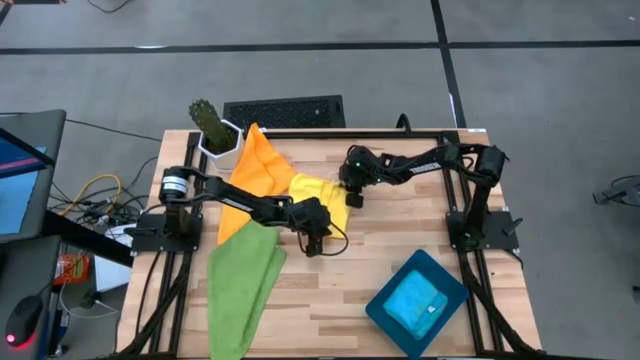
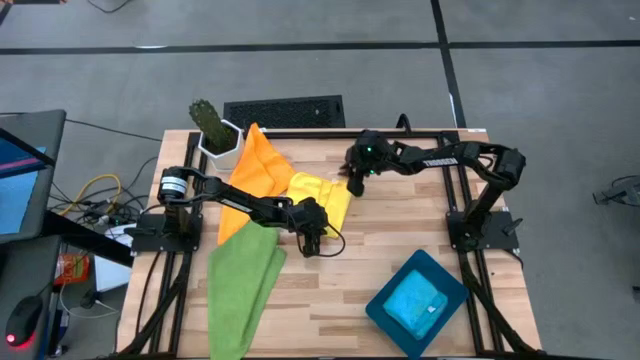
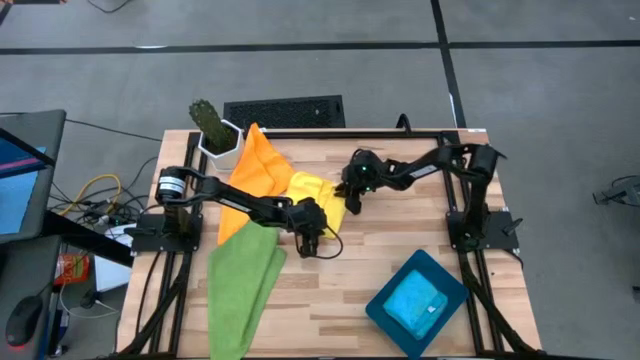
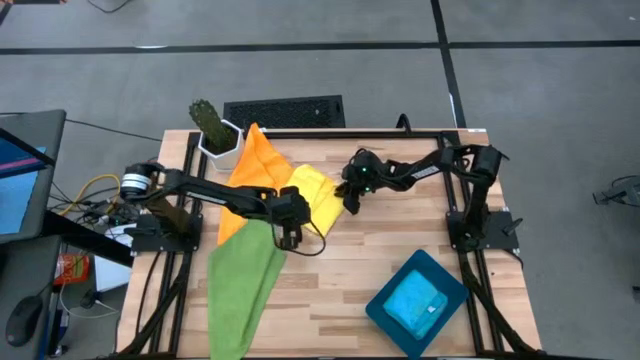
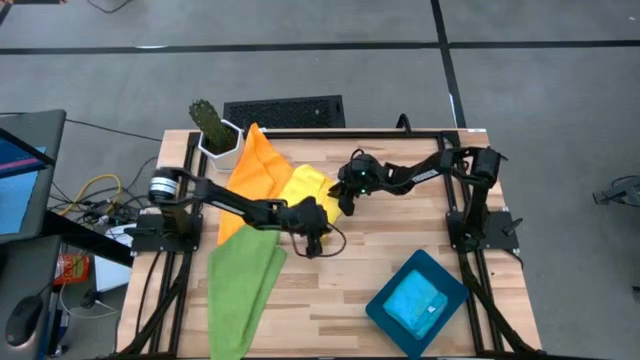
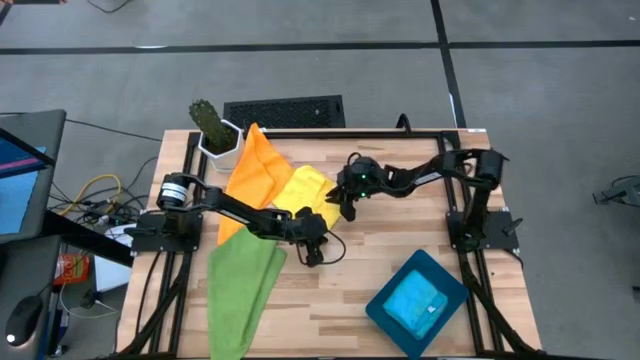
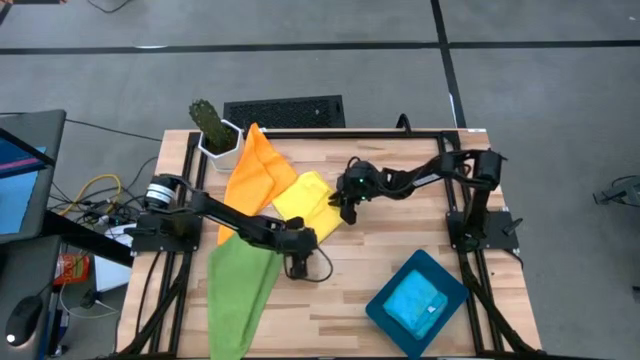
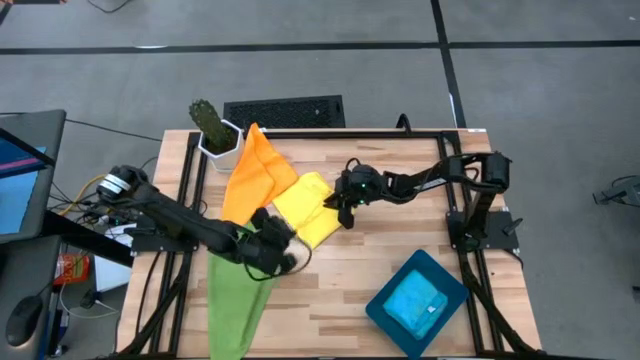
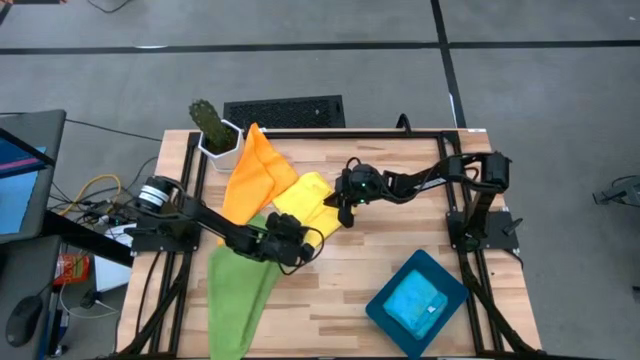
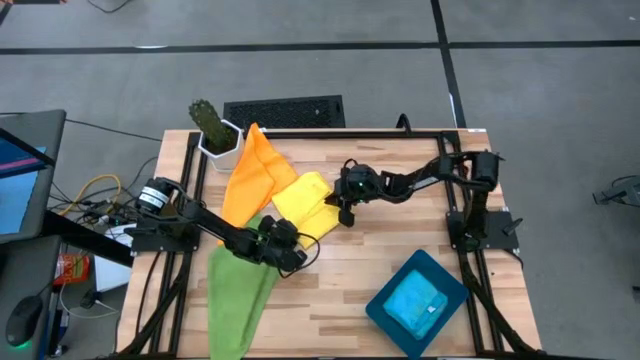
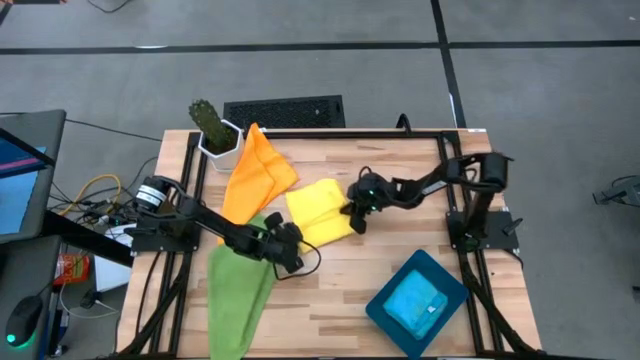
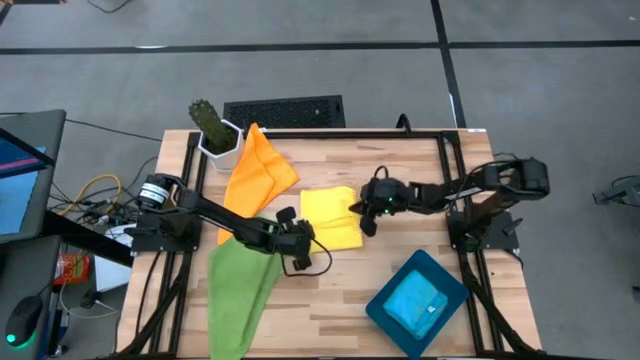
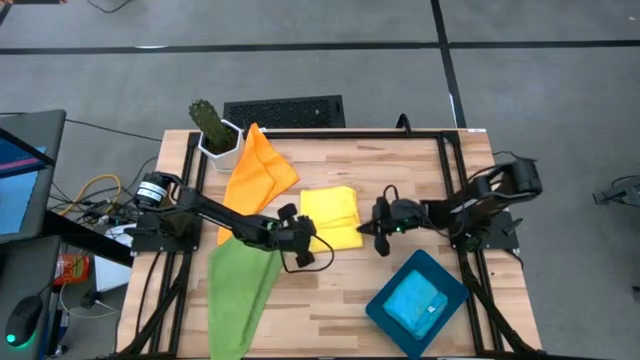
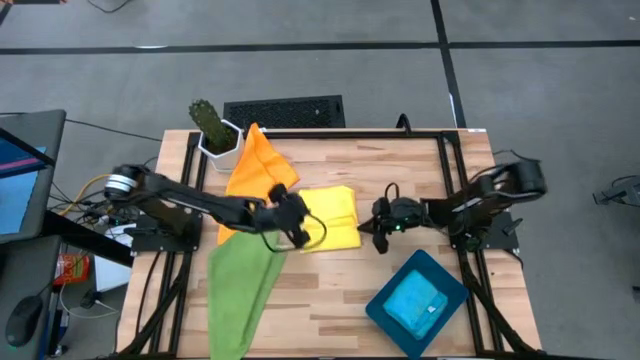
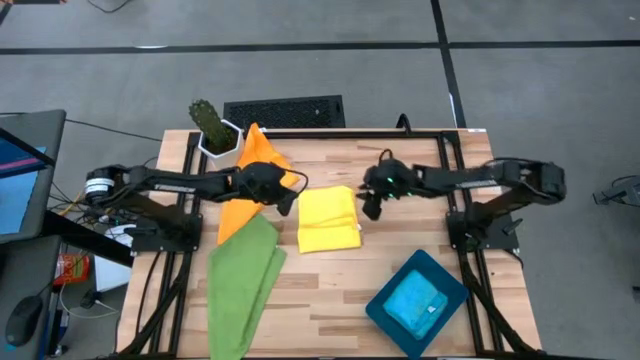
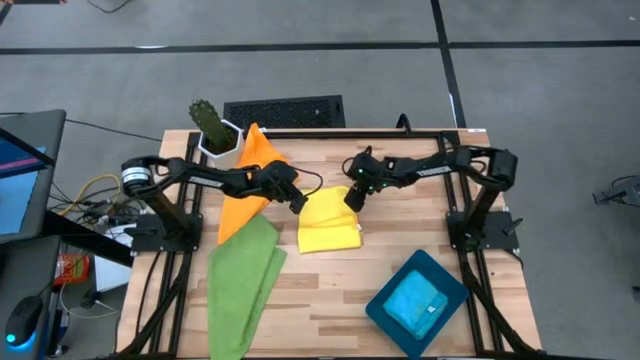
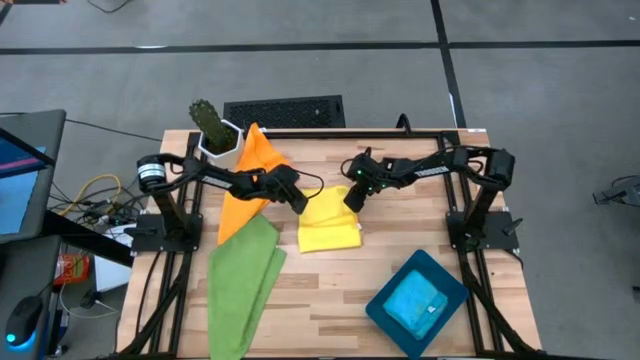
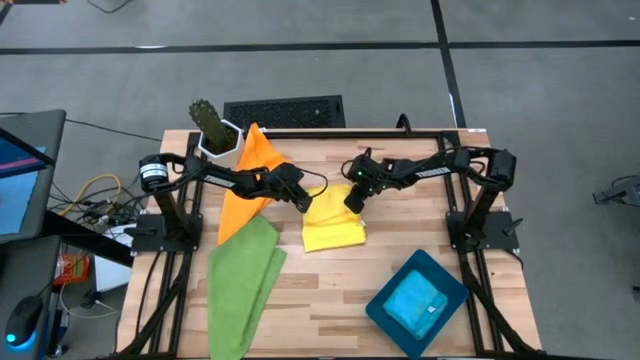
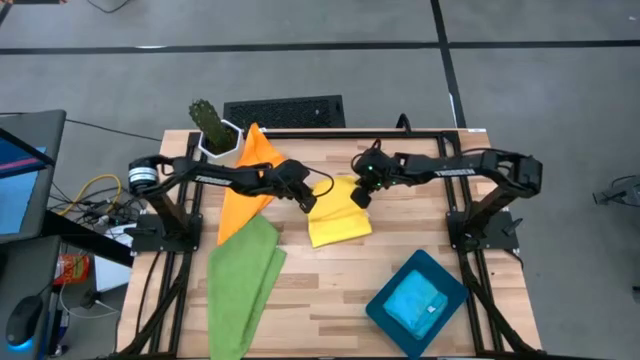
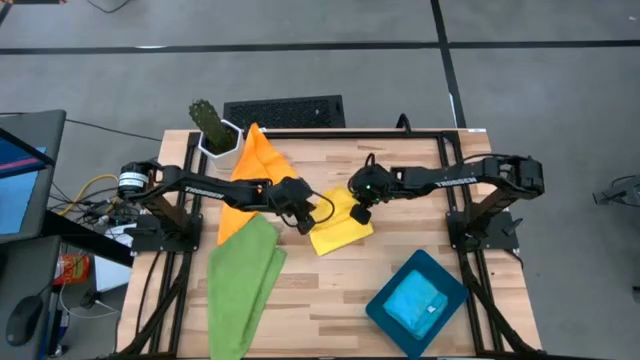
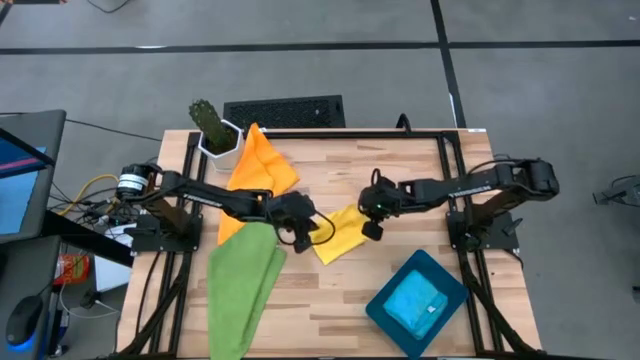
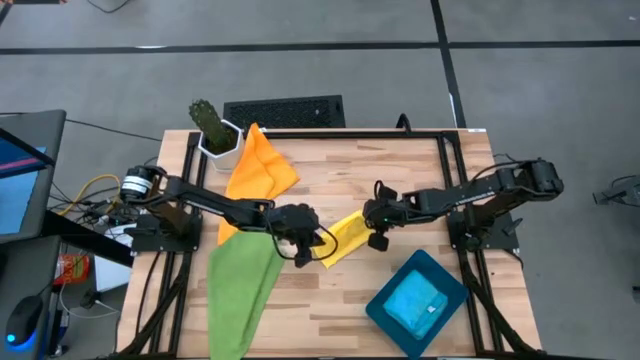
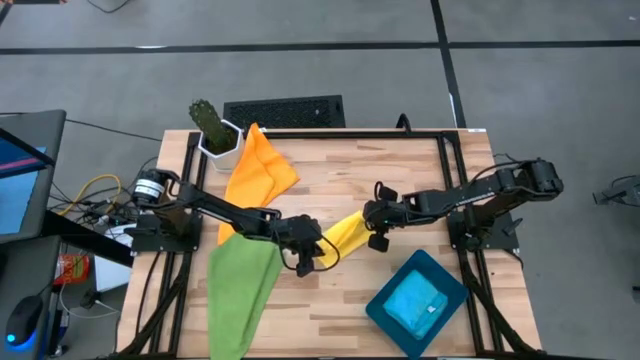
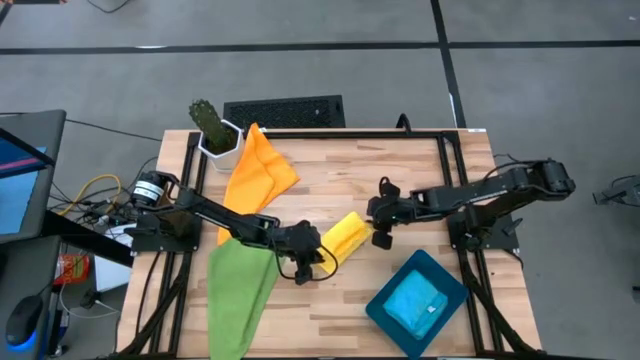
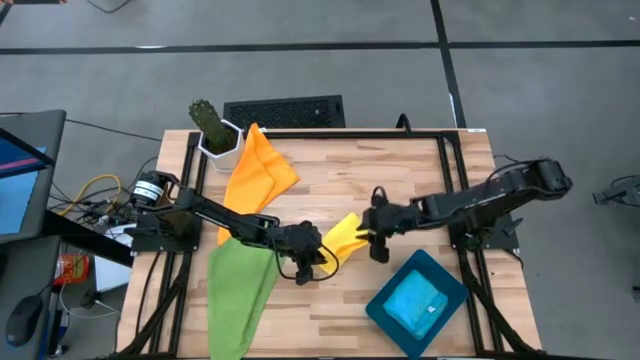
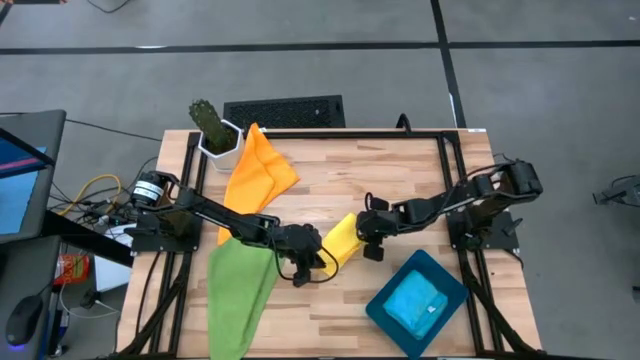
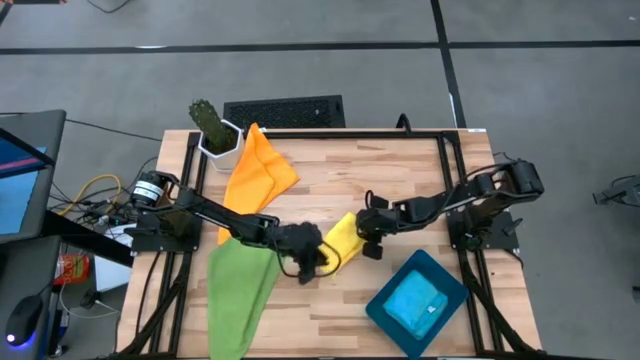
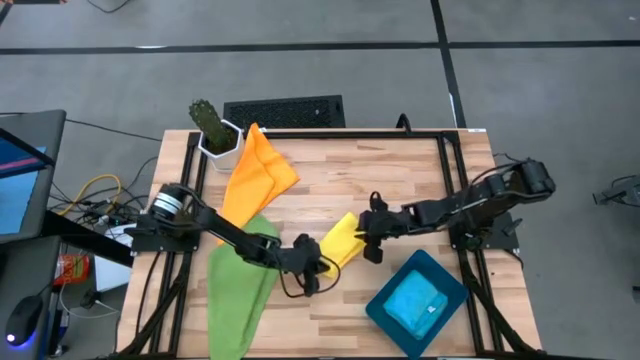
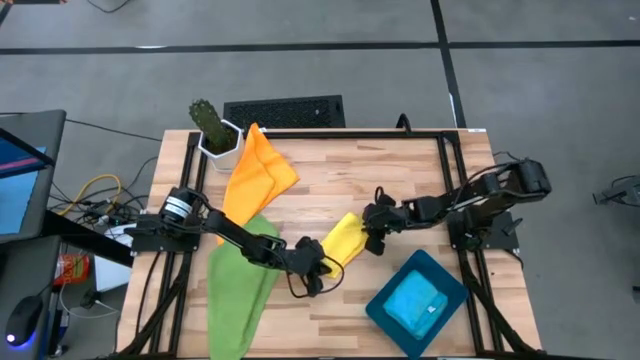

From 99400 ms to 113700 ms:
Task: Fold microfiber towels
Fold the yellow microfiber towel

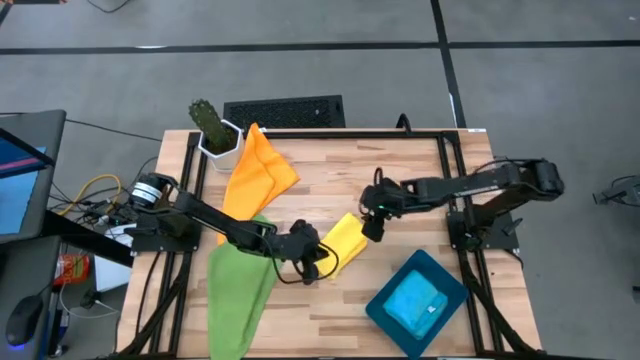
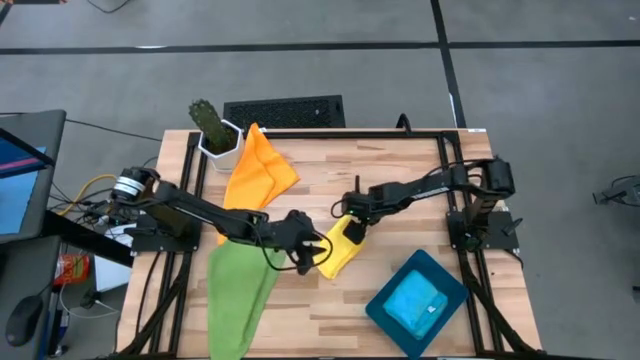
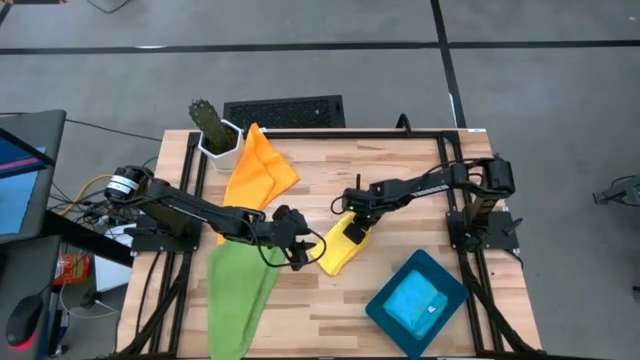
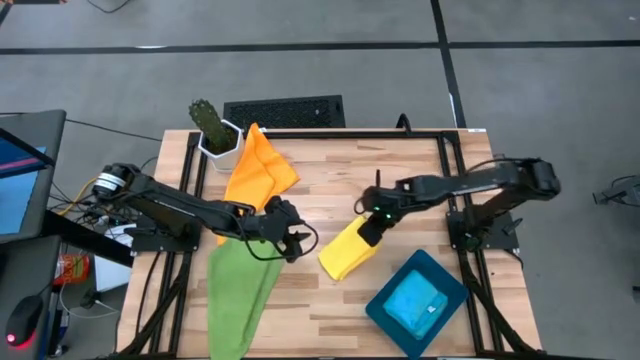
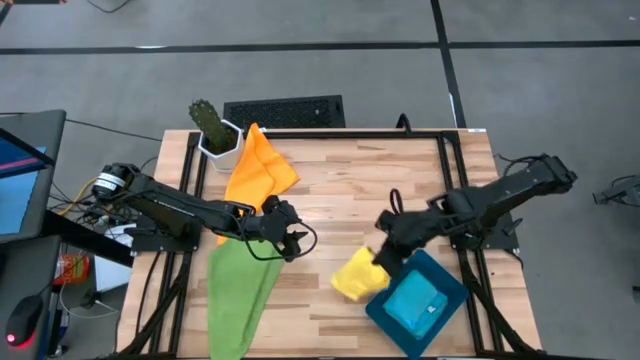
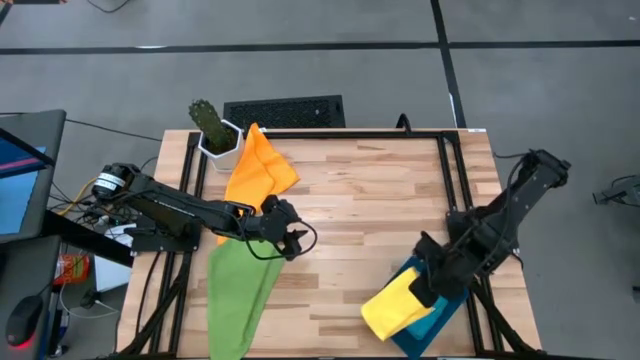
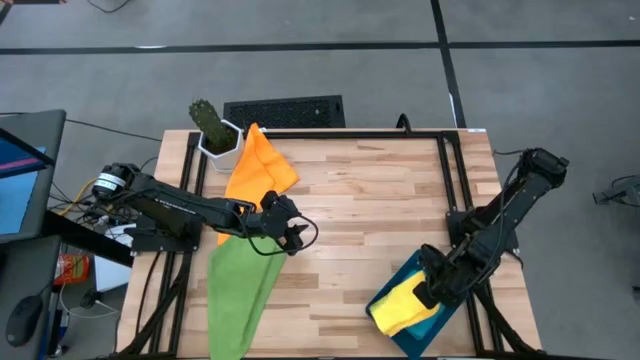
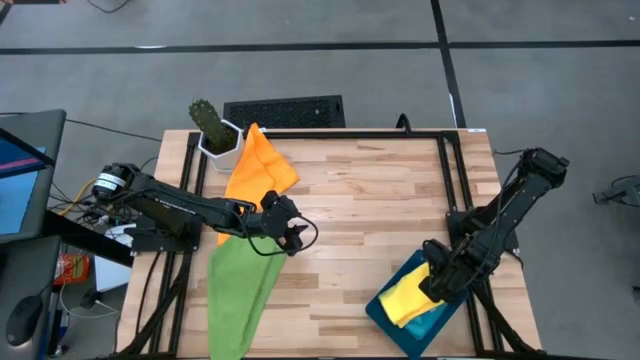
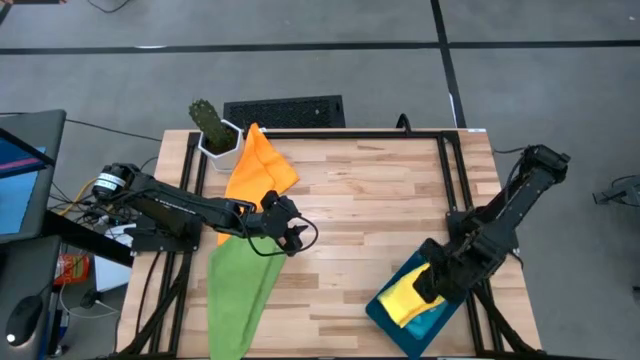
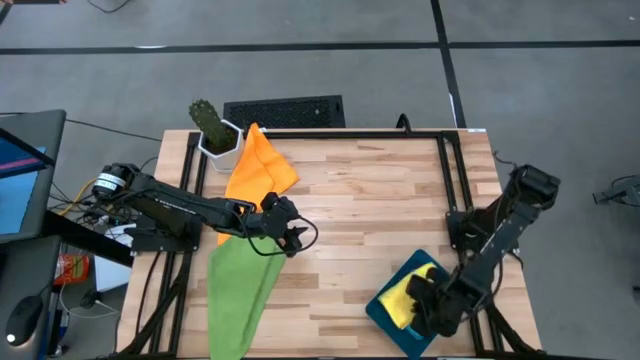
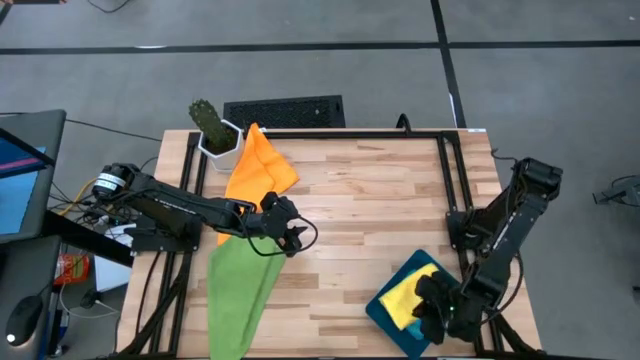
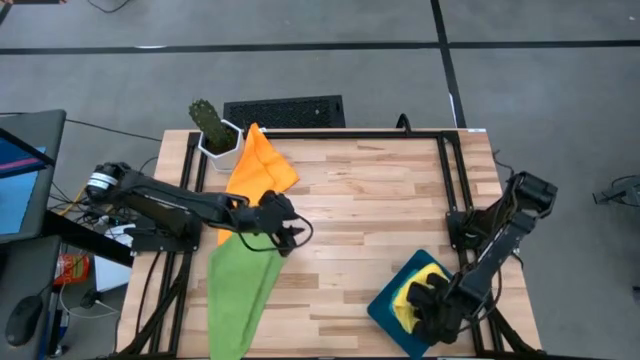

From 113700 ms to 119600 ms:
Put the folded yellow microfiber towel into the blue bin
